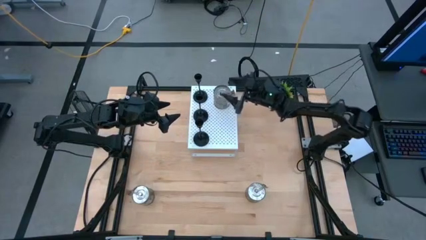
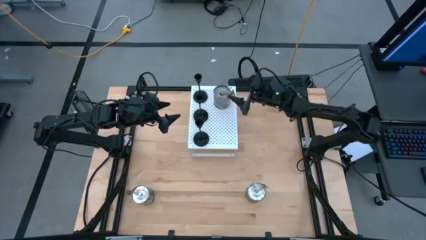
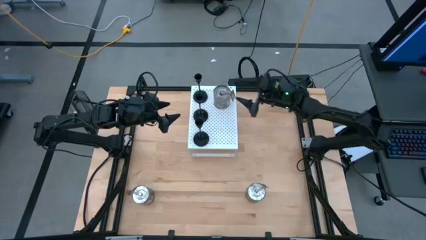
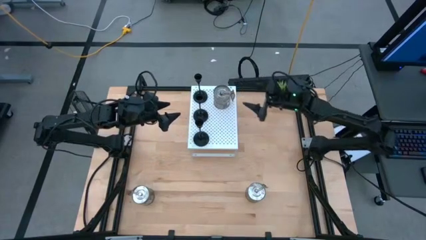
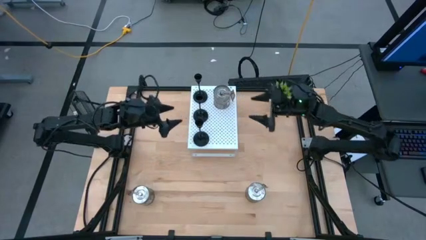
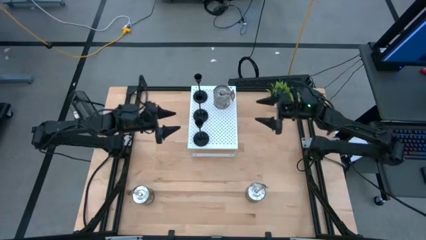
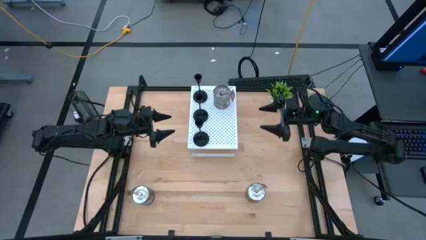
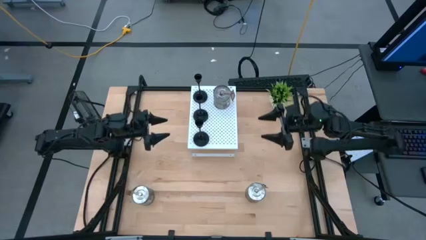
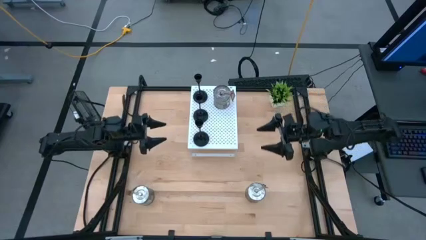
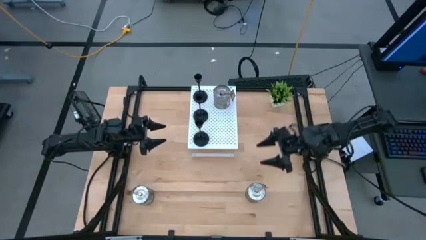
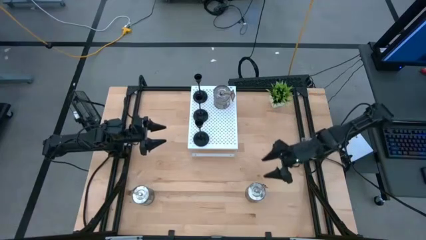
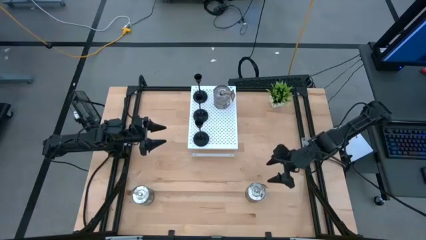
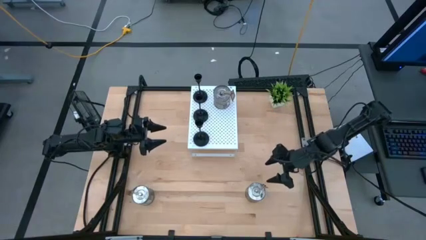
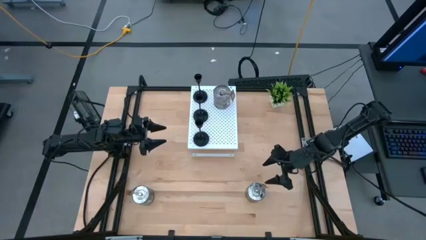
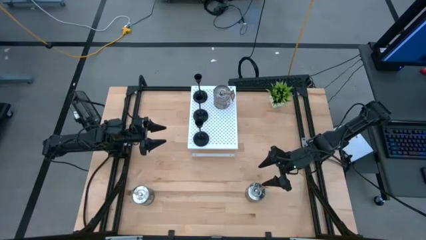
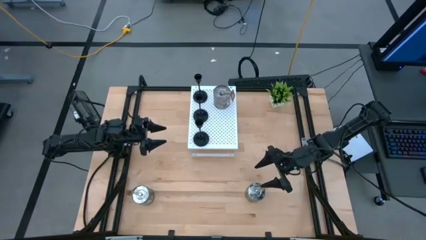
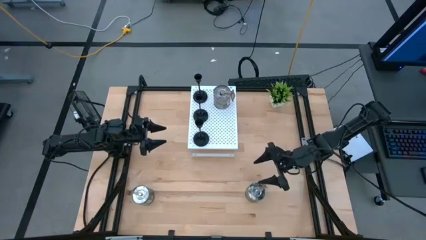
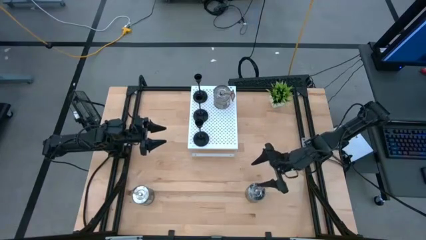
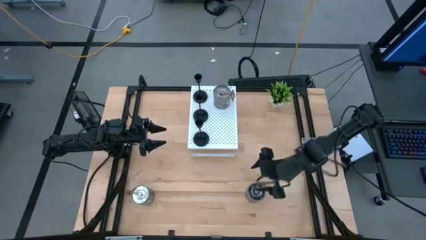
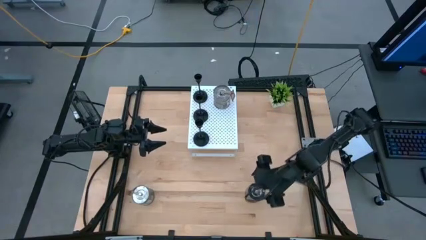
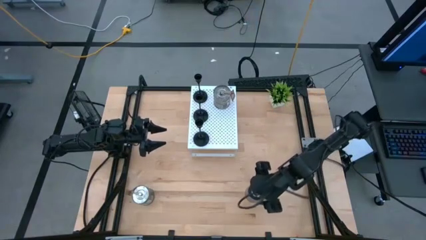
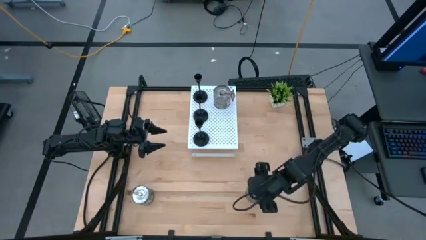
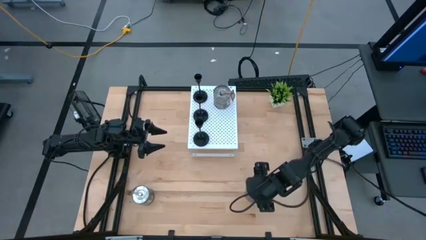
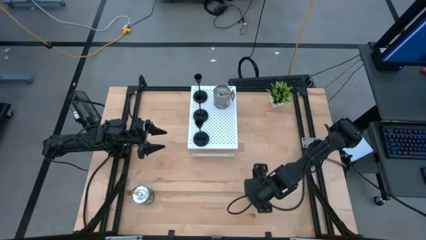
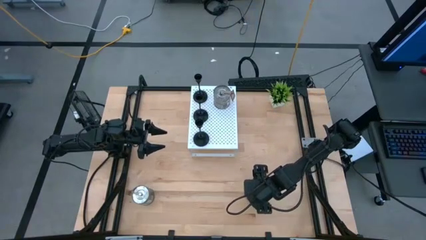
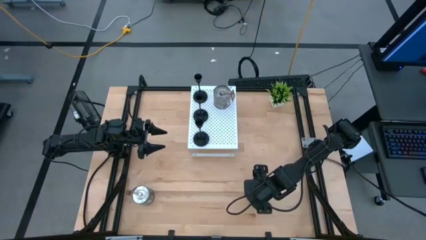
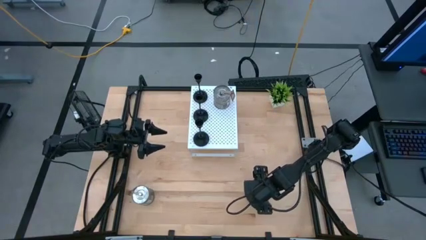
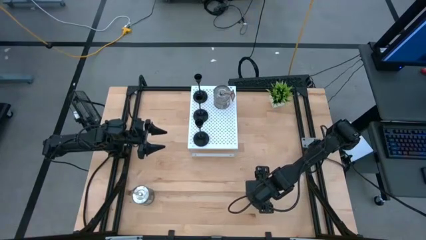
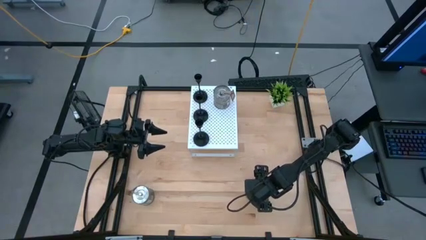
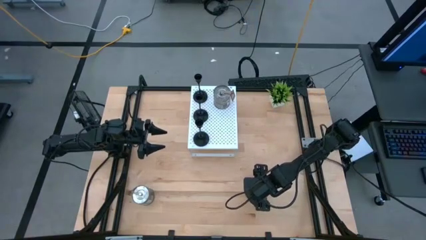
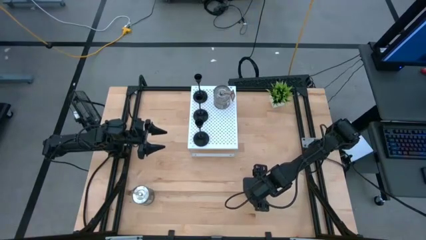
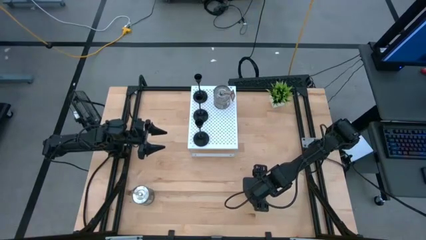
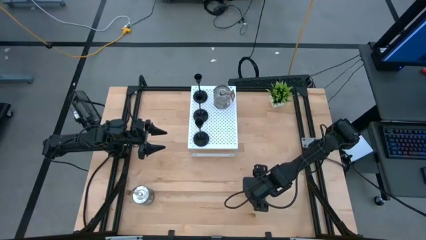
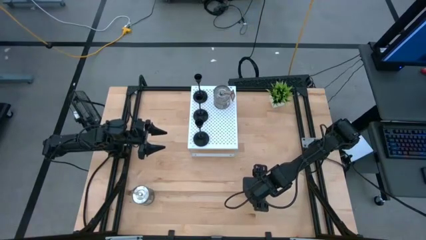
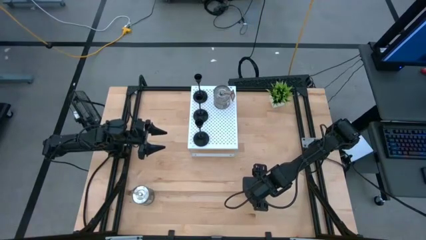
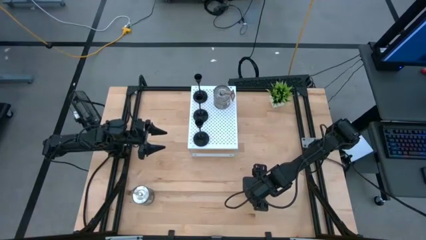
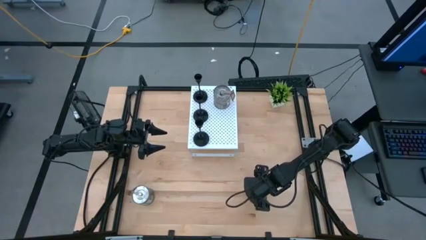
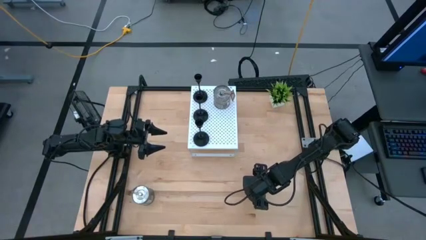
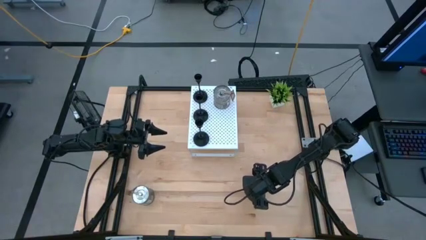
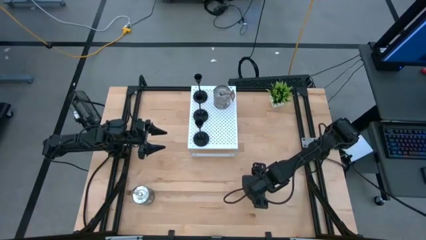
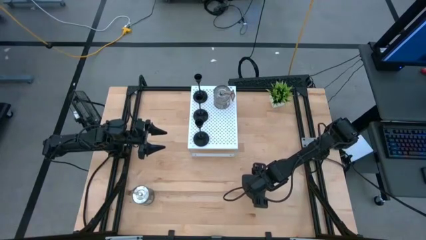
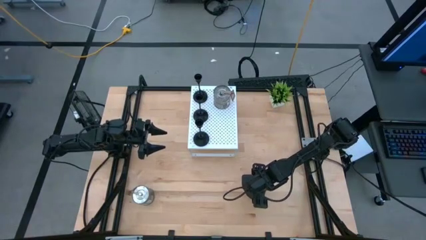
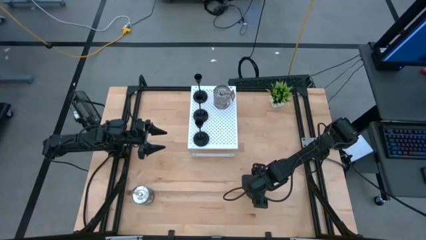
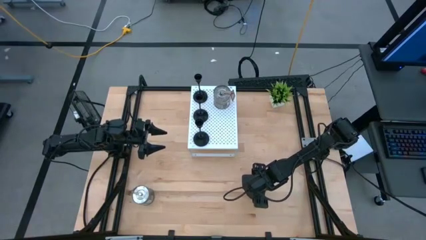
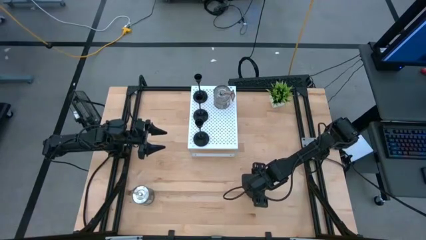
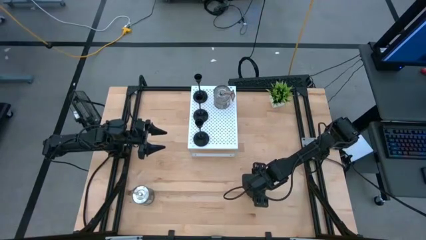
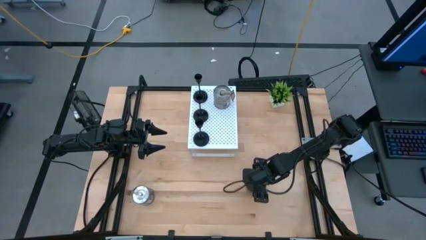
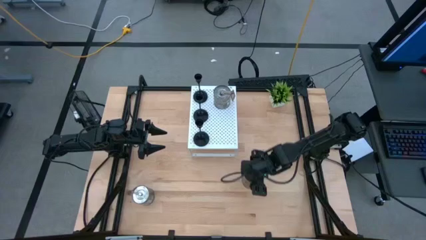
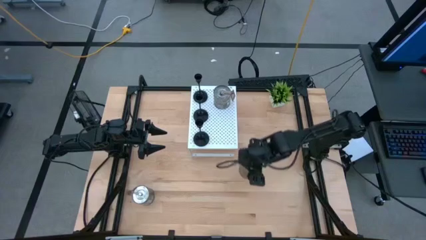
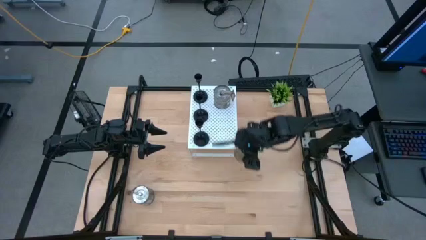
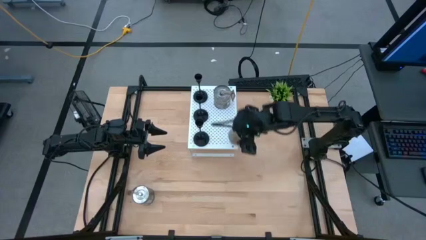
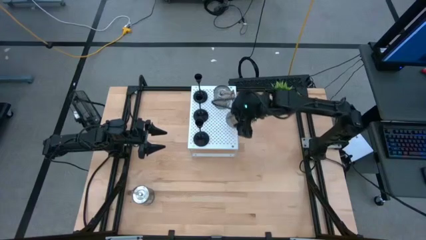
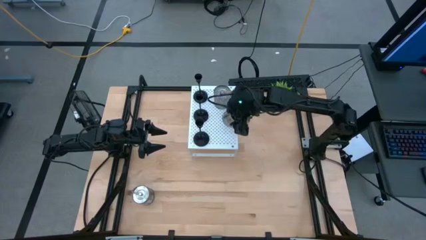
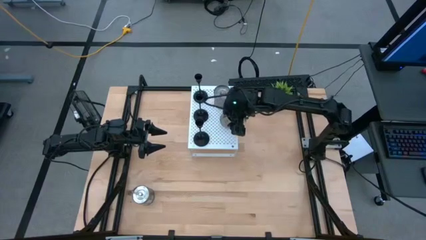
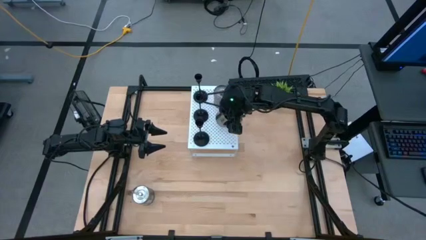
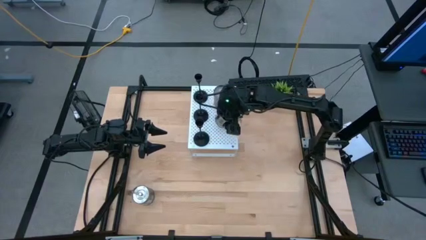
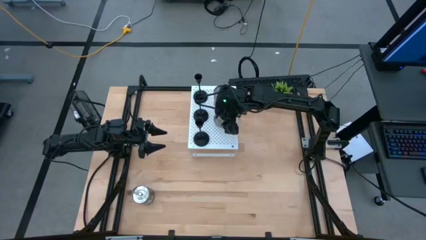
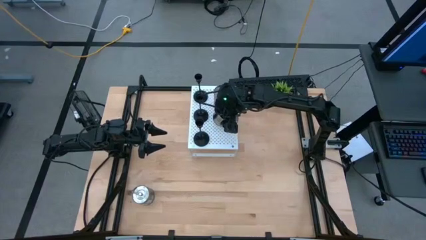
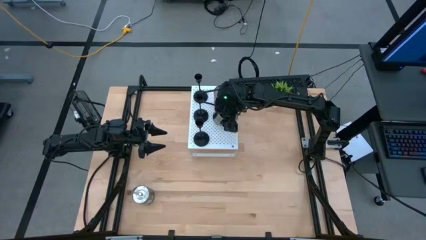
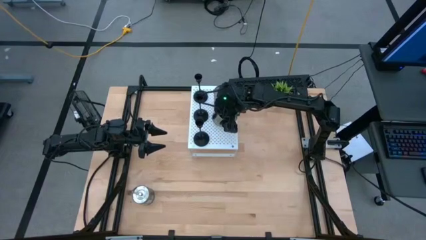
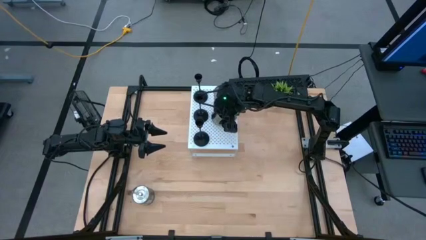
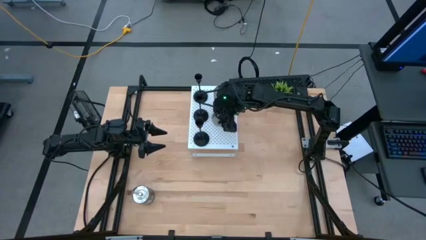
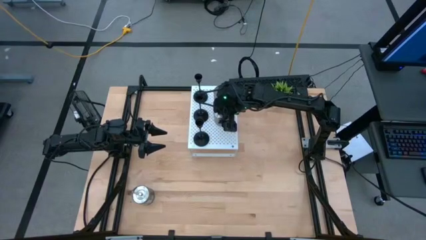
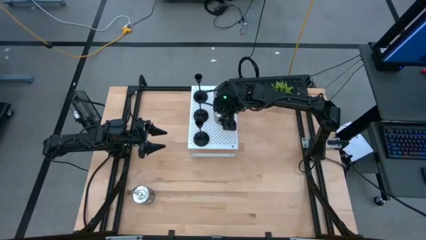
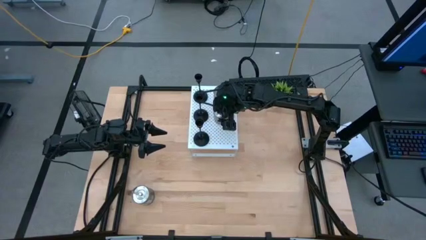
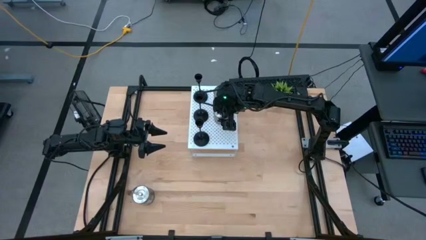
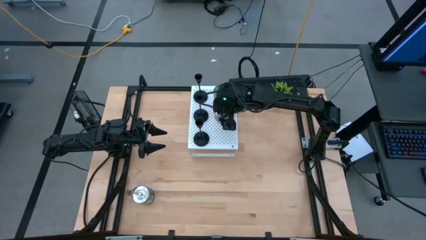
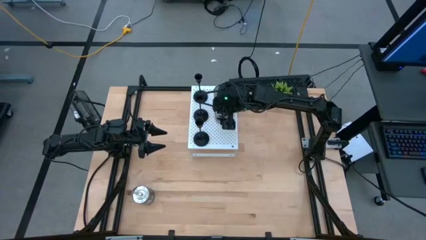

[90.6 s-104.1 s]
Task: Pick & Place candle stick holders
Put the right silver scented candle on the shelf aligned with the other silver scented candle
